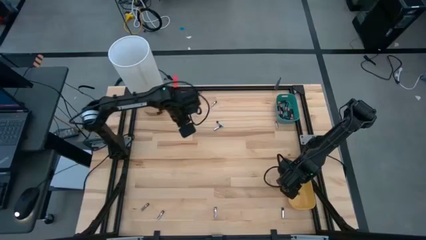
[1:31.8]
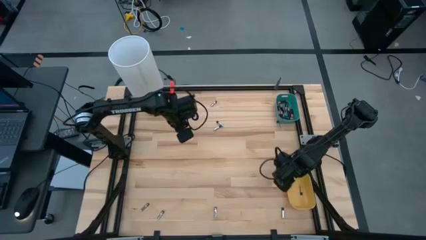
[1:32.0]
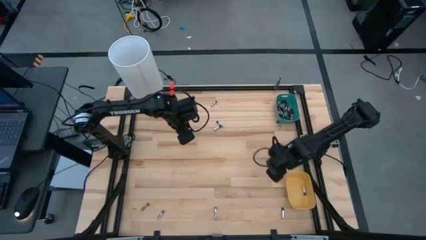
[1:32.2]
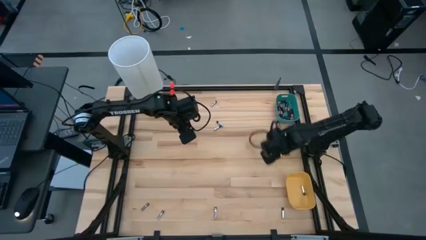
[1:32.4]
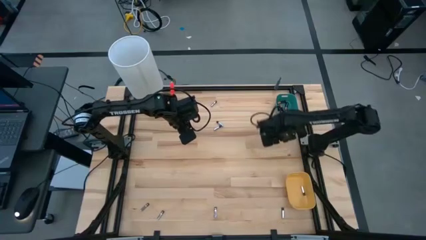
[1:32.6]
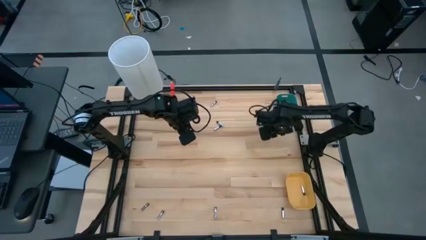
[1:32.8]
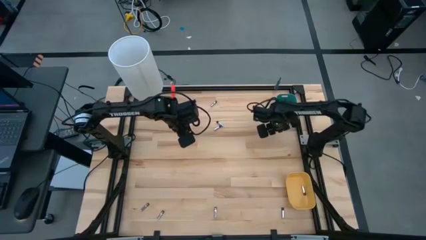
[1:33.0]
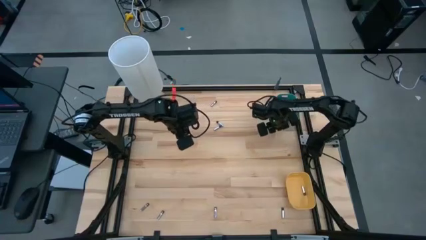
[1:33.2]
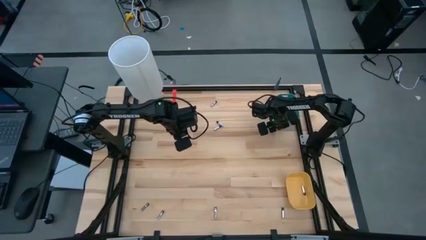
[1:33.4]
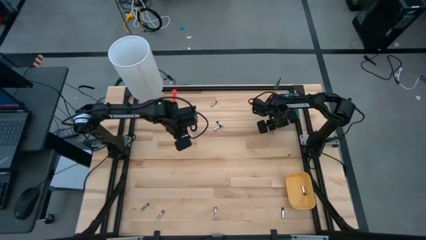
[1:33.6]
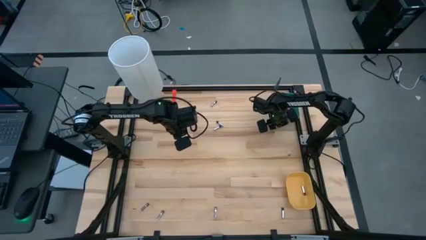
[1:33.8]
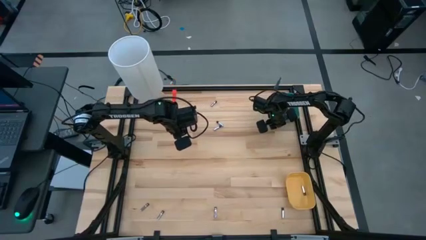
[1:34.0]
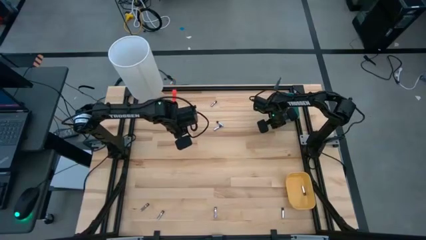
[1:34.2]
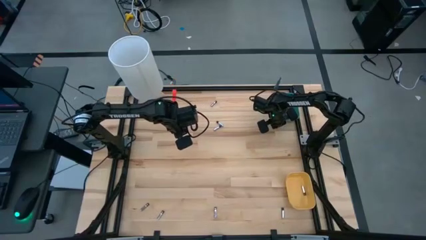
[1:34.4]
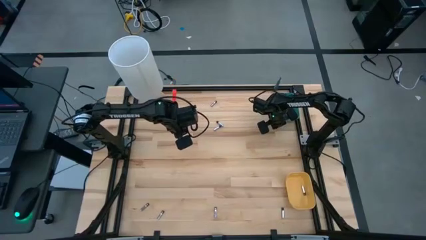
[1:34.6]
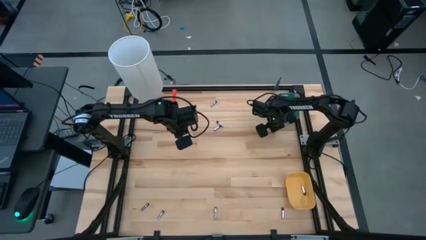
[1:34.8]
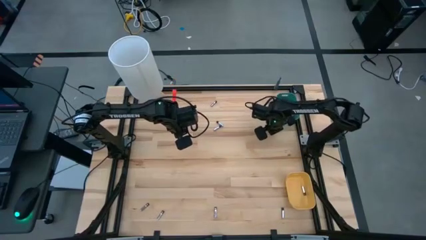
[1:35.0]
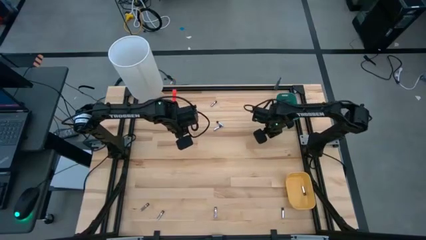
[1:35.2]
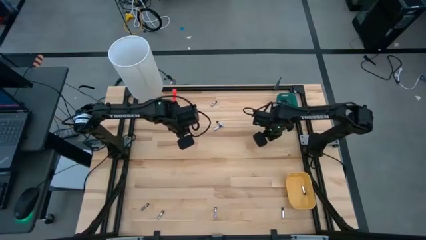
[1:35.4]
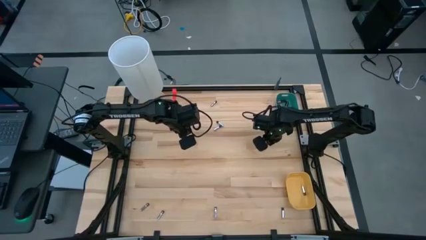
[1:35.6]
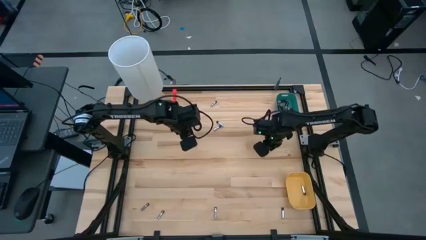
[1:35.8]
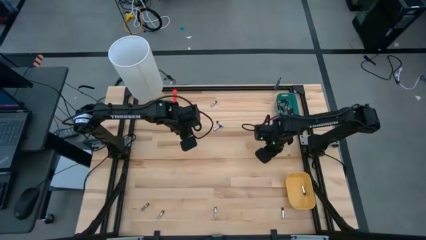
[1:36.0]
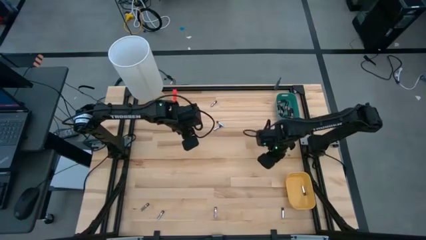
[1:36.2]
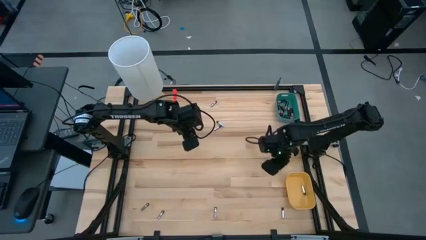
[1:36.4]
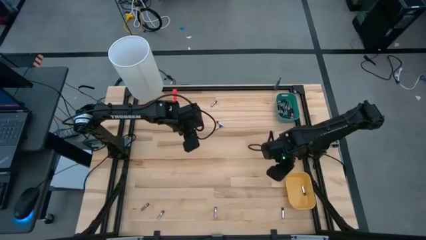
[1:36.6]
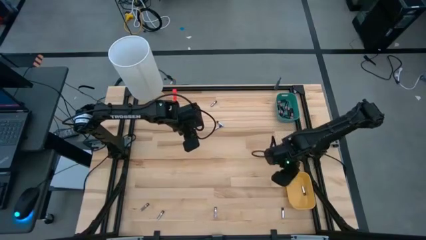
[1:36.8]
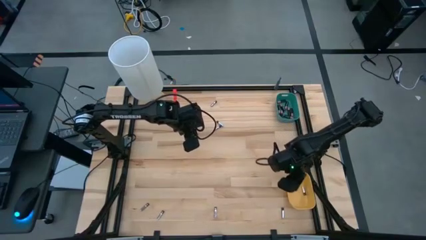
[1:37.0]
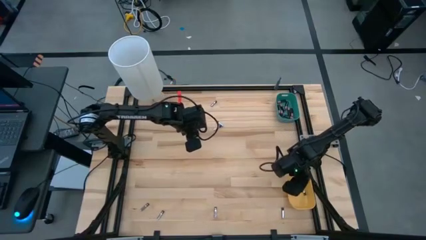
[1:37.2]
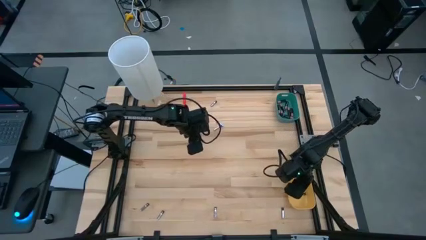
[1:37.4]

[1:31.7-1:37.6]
Task: Sort batteries
Put the silver battery into the yellow bin

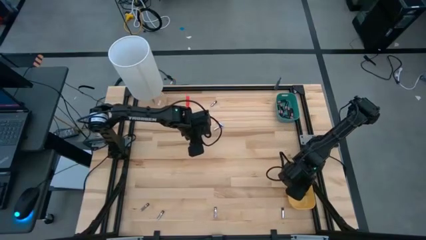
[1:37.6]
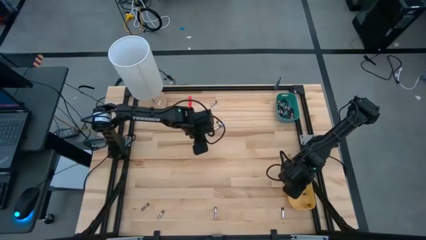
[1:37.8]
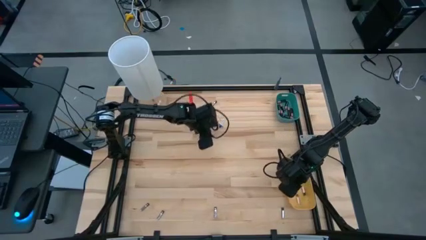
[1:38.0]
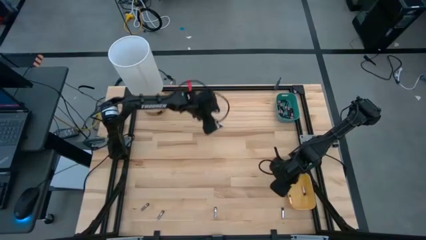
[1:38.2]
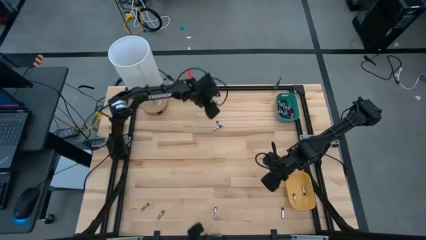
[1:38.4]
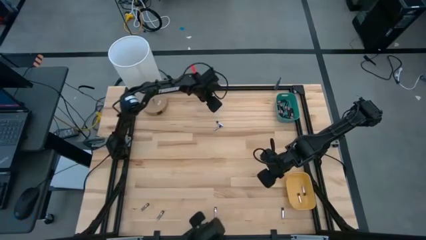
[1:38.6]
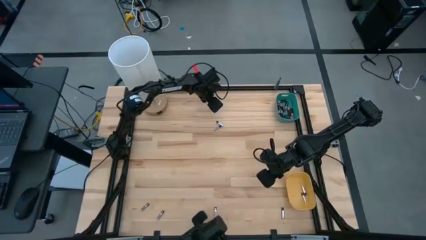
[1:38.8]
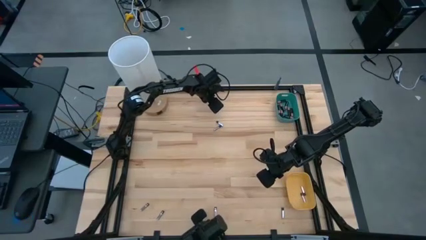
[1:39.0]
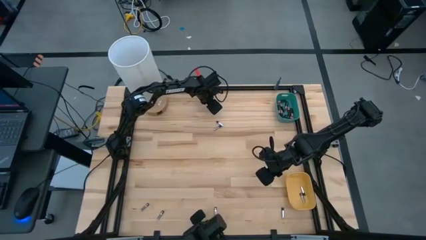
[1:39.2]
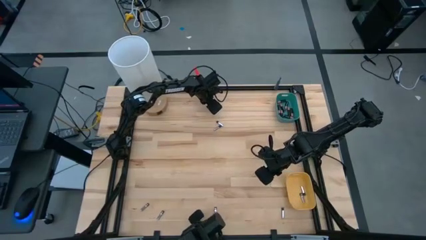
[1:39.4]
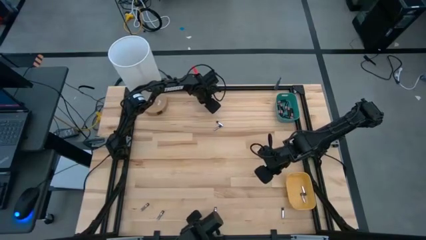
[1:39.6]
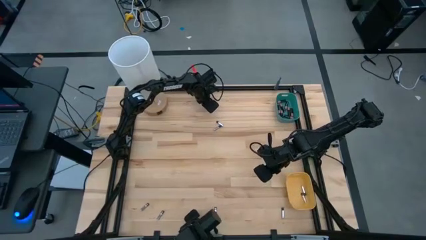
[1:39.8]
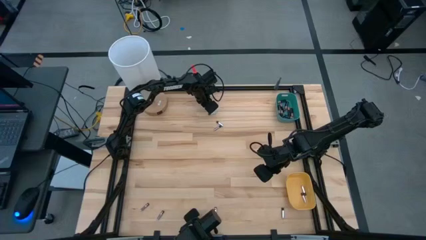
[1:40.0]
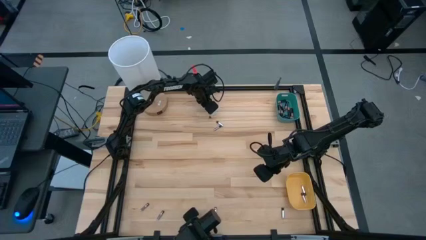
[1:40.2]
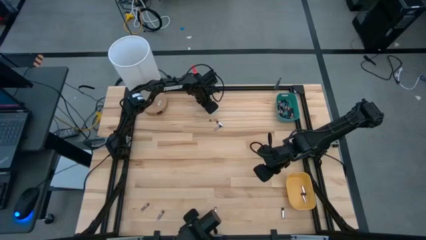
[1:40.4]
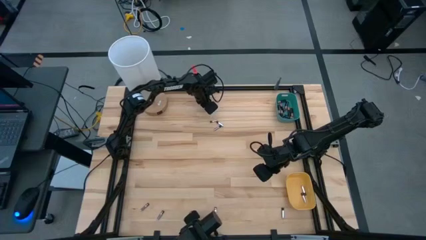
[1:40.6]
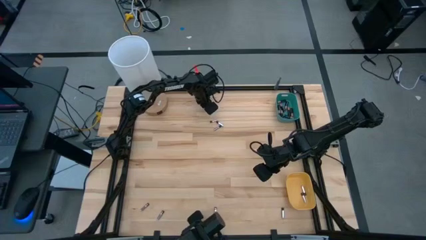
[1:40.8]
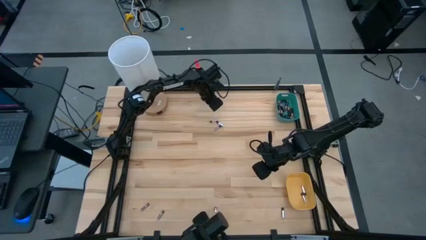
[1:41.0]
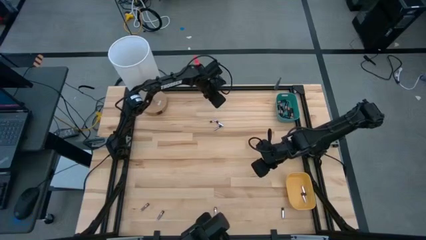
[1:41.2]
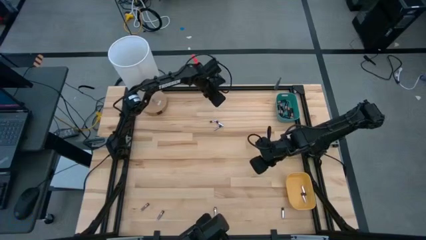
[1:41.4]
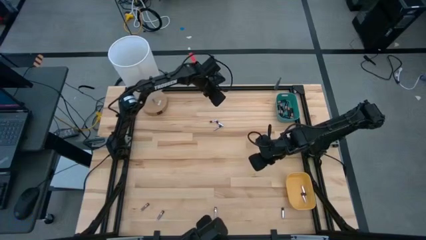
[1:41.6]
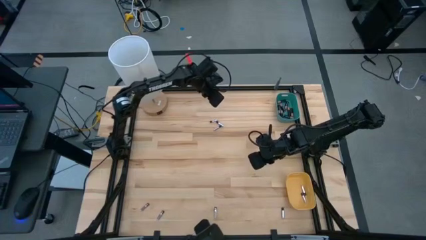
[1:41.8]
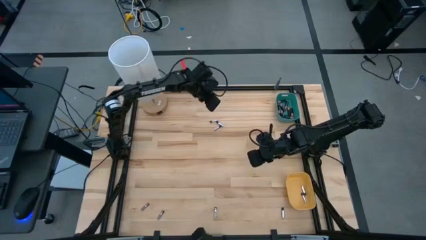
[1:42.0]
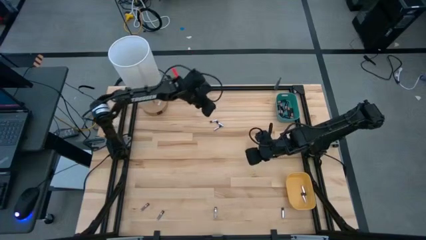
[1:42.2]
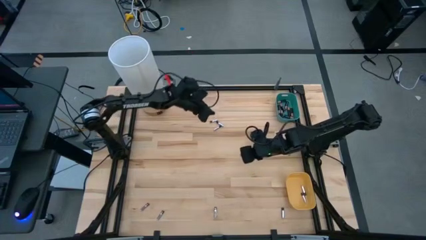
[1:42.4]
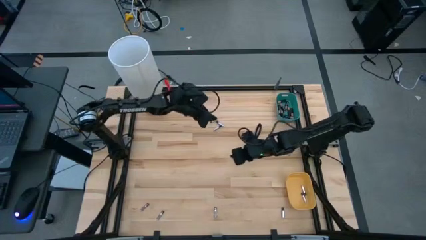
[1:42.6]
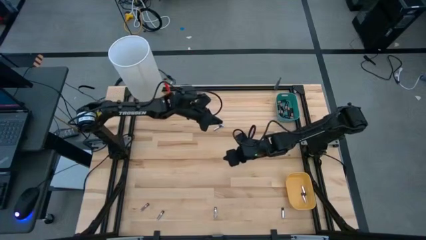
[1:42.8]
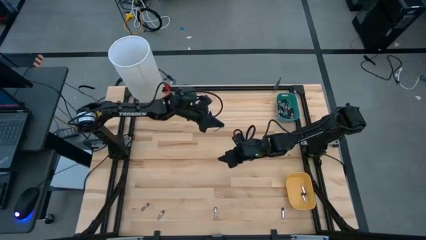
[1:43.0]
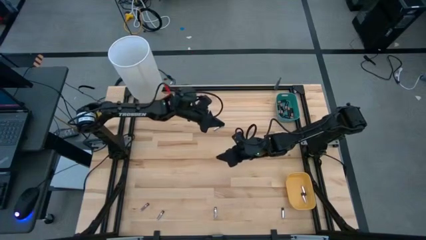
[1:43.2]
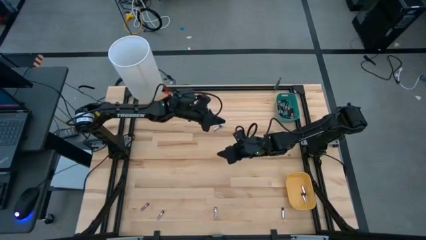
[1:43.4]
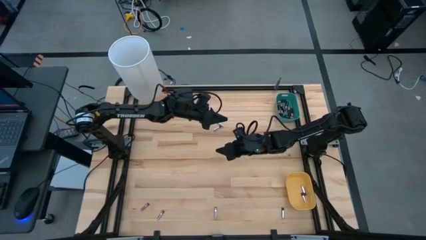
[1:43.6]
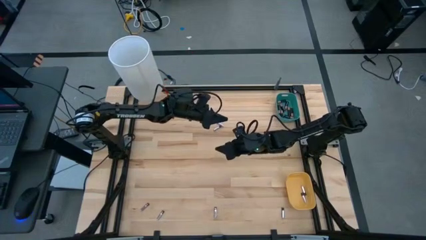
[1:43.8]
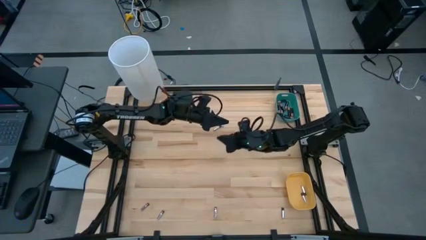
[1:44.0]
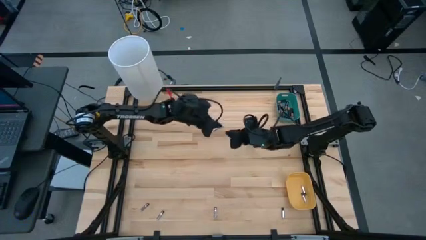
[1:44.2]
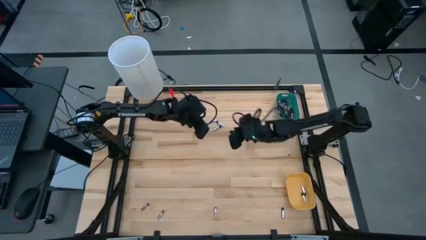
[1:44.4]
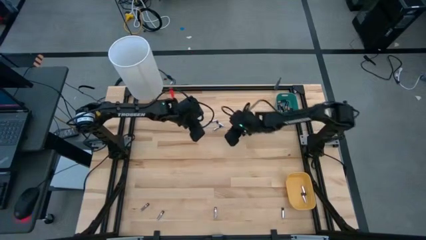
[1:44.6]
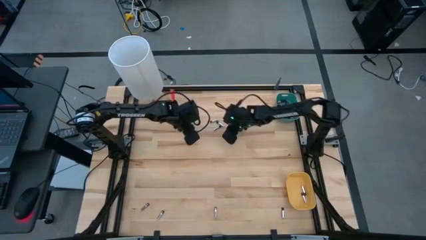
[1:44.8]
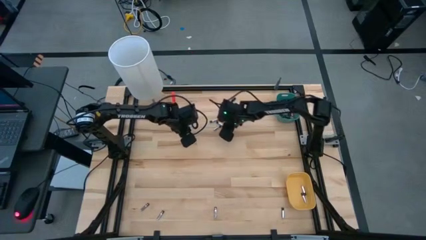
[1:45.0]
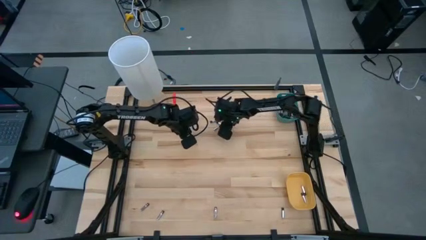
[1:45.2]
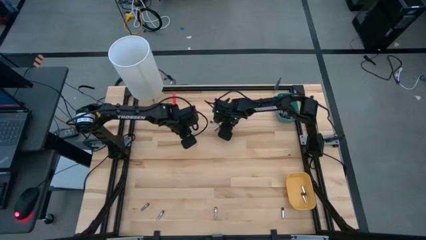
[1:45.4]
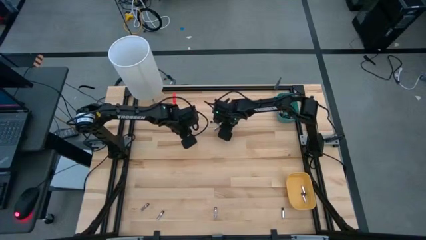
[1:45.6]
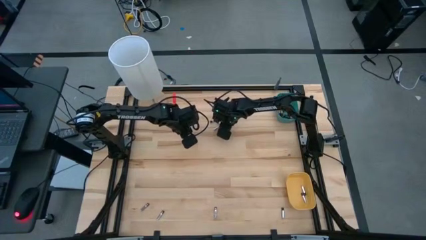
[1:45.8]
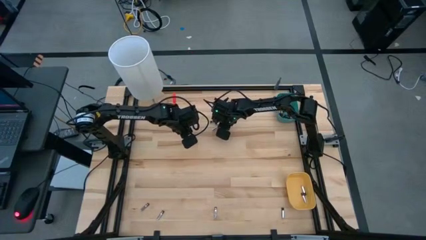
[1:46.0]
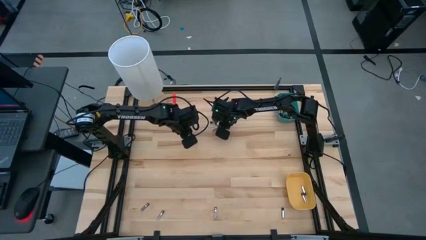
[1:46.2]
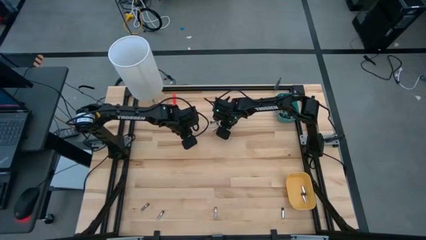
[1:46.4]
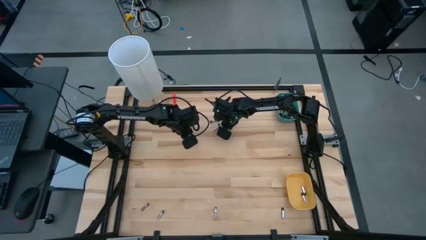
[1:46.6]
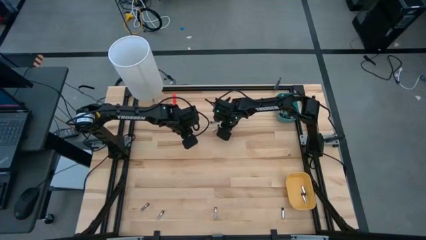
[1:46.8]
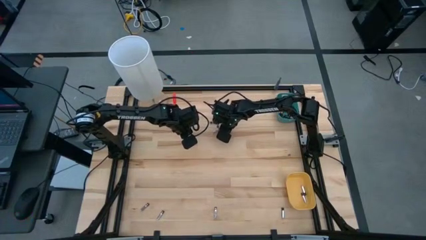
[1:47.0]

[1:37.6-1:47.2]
Put the silver battery into the yellow bin

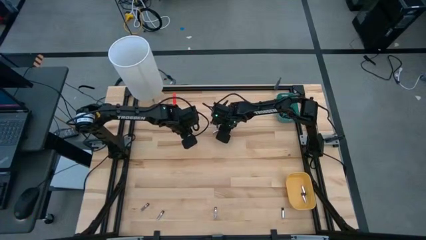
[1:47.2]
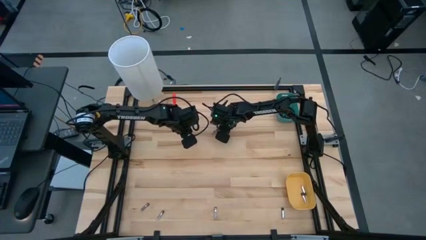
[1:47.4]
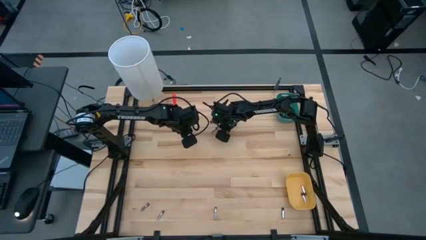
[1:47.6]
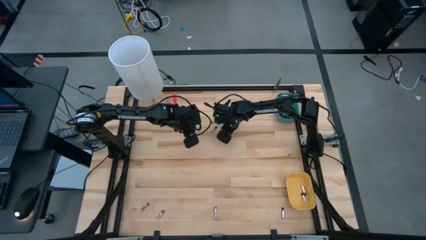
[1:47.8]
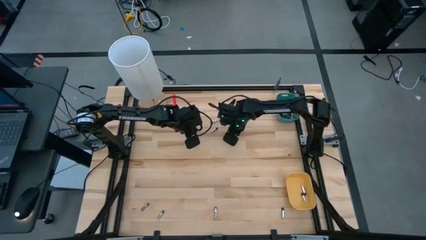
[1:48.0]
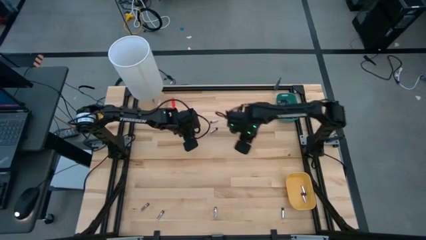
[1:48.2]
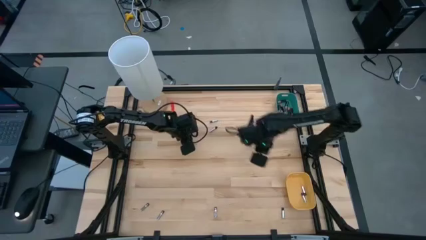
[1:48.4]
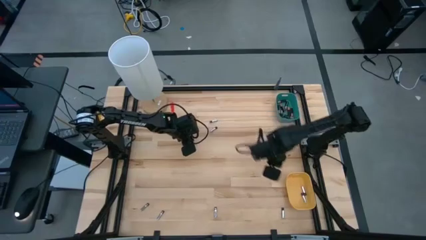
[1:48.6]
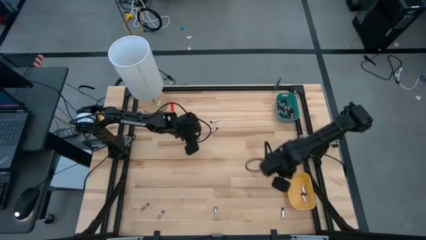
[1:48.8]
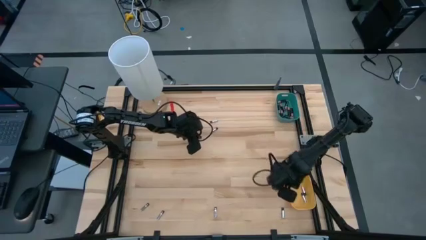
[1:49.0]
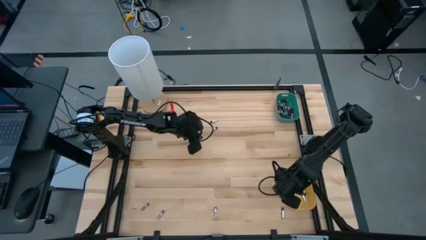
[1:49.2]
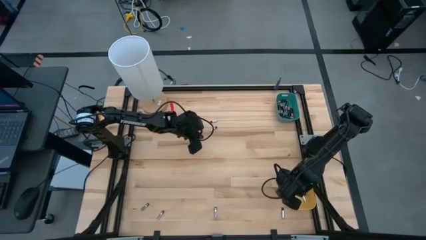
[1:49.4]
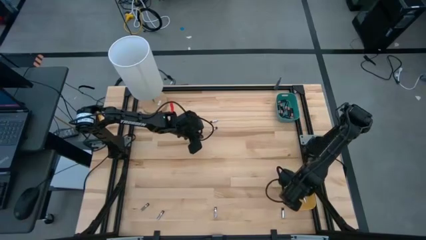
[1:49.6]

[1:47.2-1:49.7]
Put the silver battery into the yellow bin
